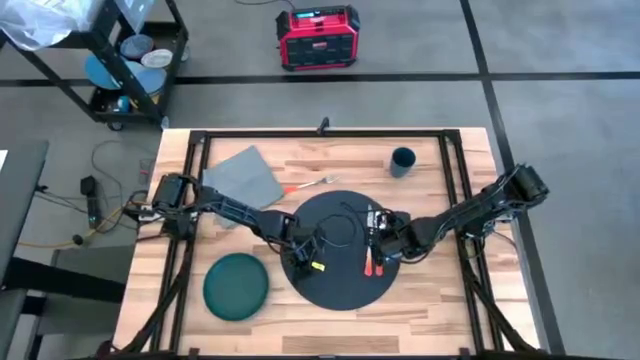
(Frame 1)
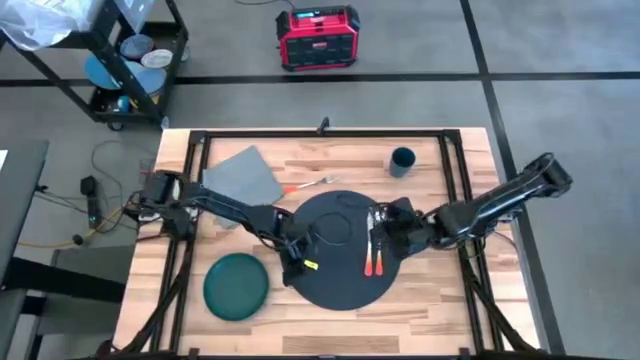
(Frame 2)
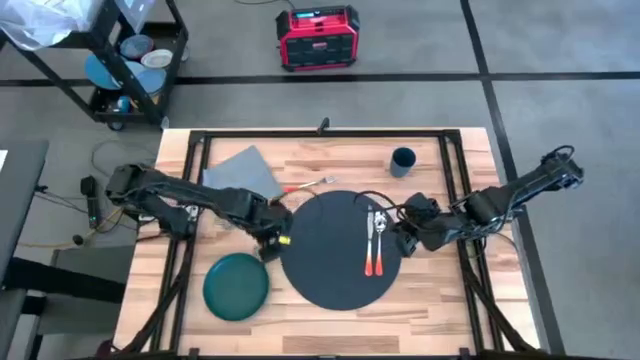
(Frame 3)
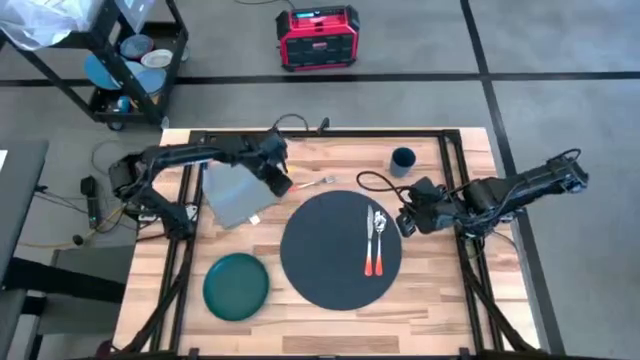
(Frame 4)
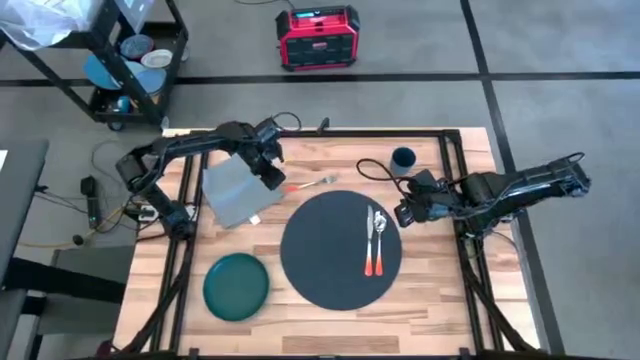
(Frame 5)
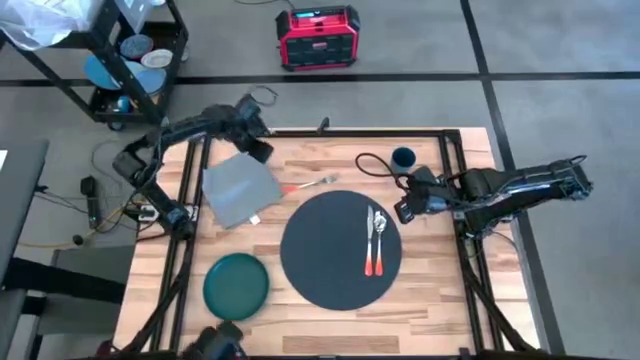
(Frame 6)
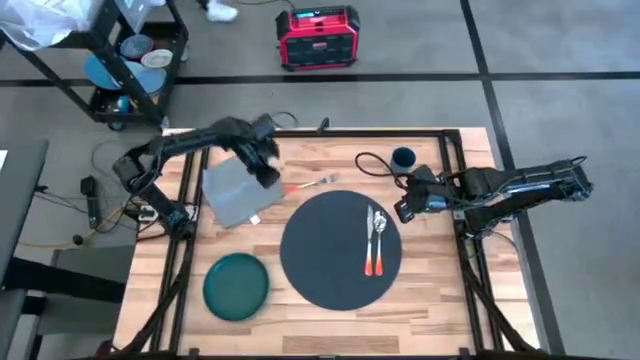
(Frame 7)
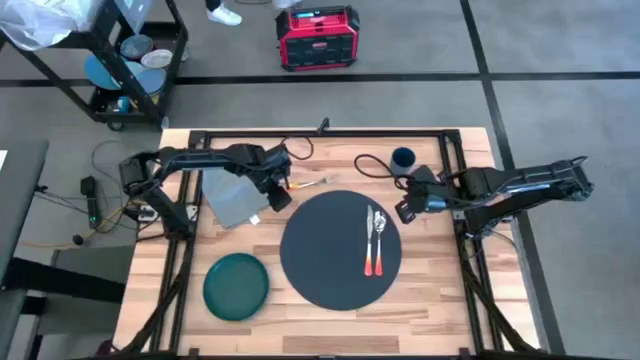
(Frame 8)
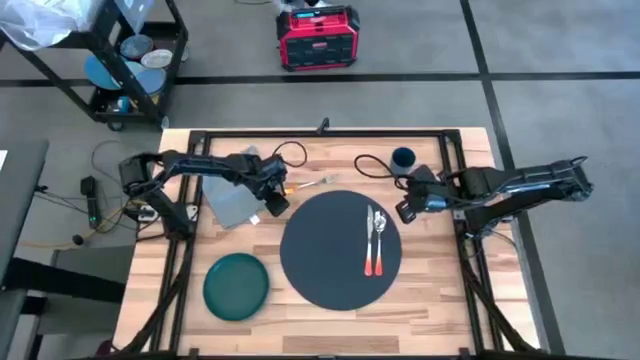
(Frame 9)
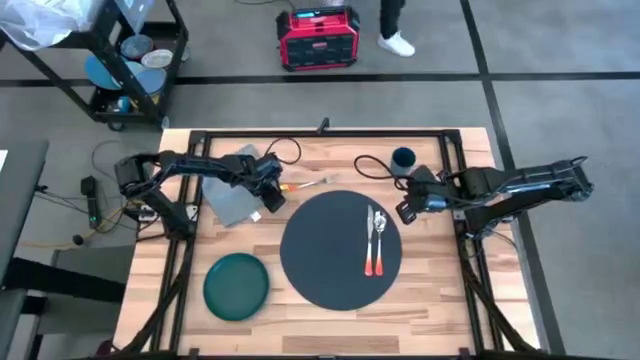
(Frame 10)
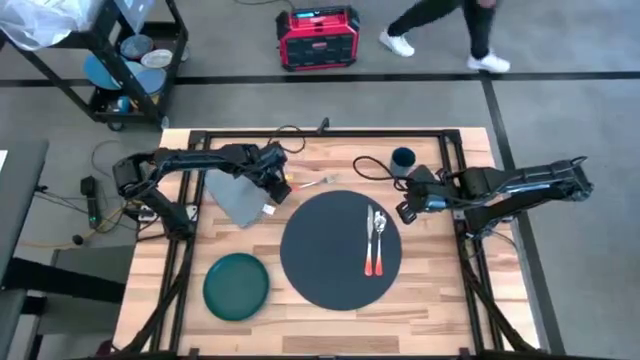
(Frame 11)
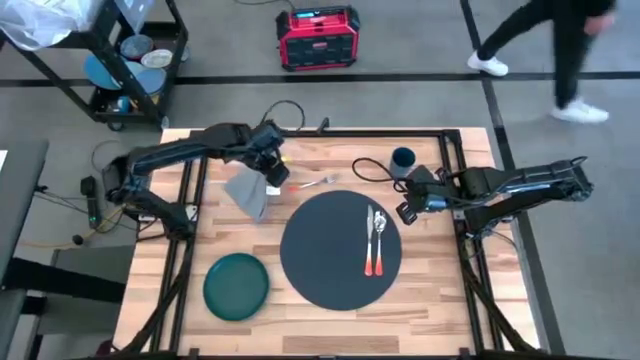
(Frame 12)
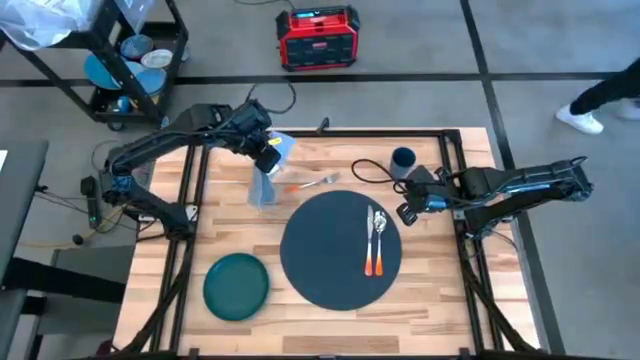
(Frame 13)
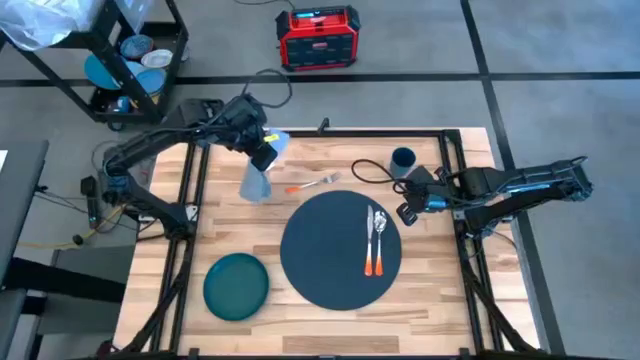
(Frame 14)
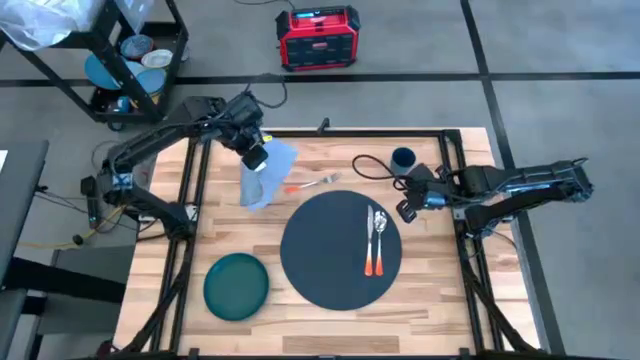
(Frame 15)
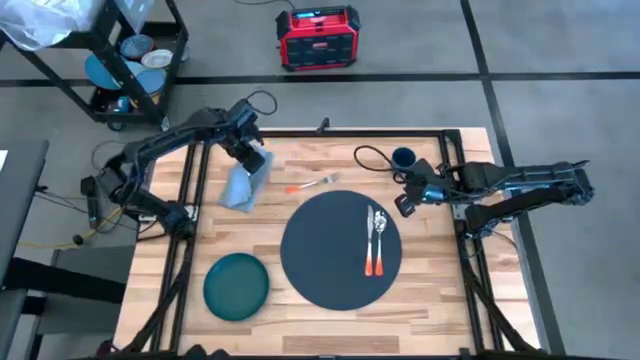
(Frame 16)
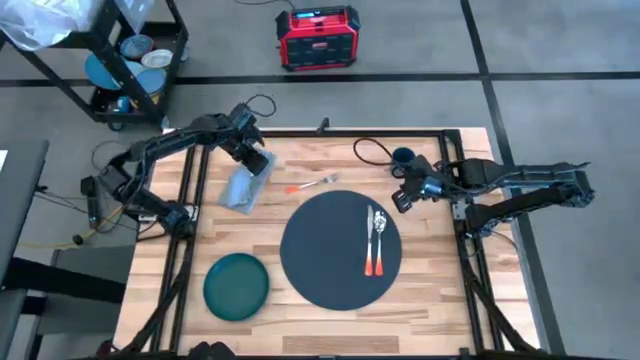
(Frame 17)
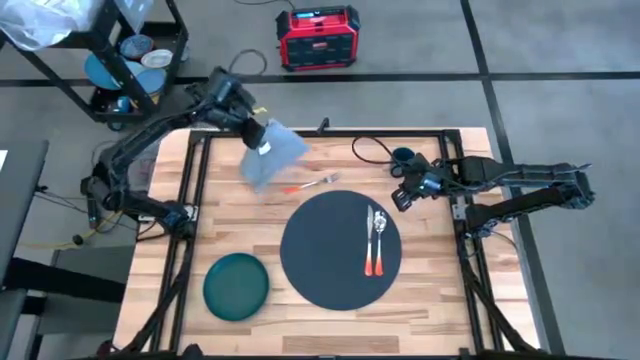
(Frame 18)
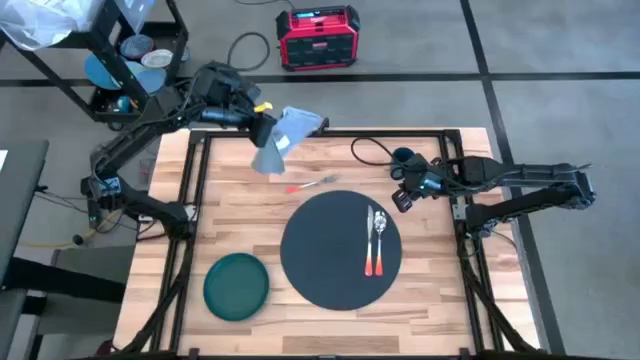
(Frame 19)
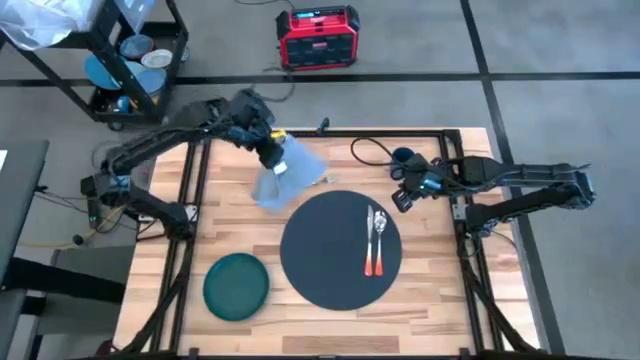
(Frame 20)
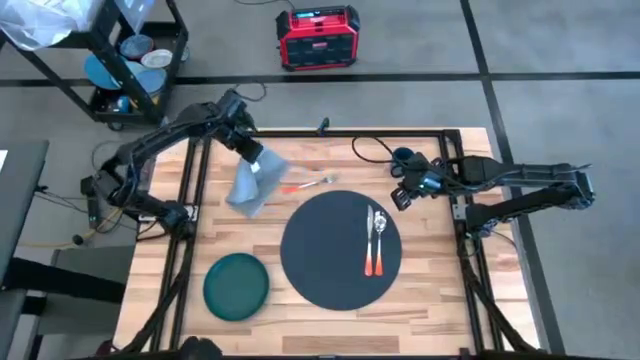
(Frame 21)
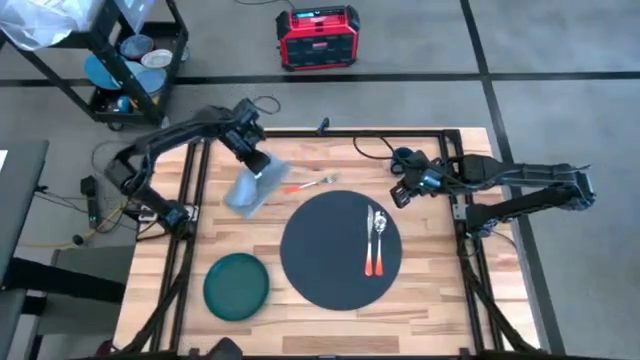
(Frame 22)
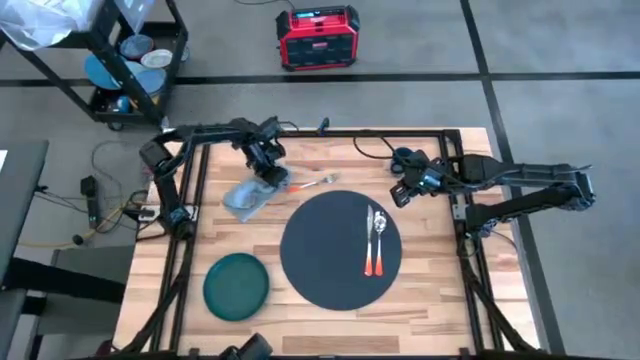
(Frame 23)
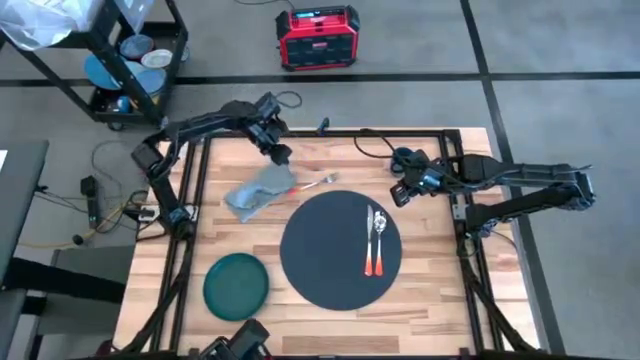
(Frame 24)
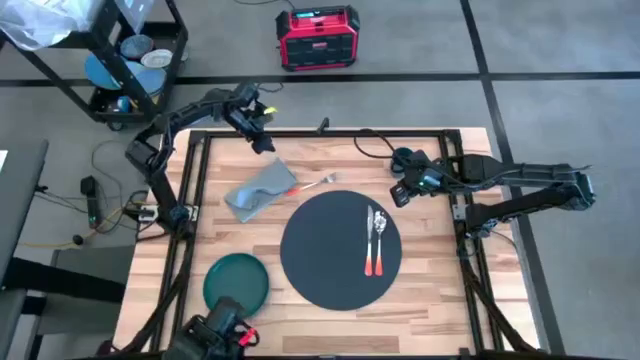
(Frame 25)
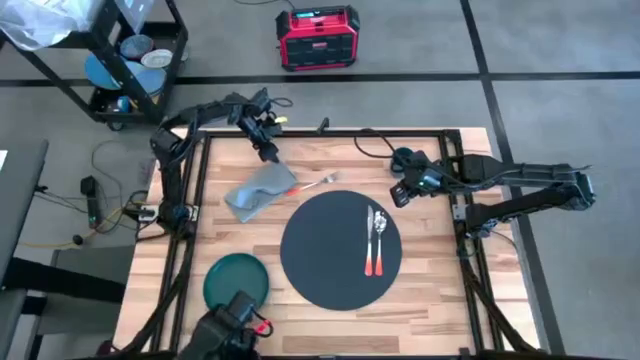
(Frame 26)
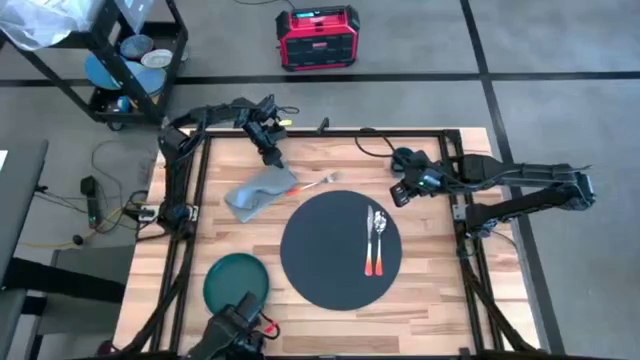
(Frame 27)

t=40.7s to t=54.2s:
Task: Set table place
Fold the gray table napkin

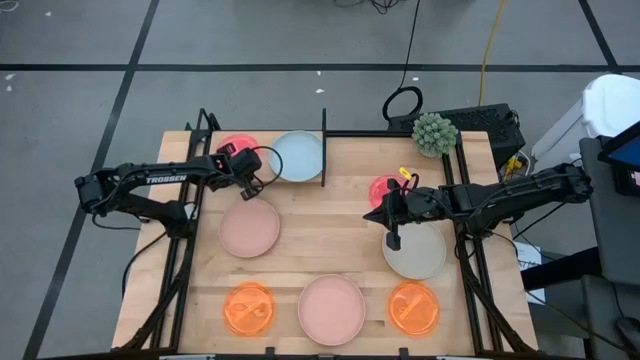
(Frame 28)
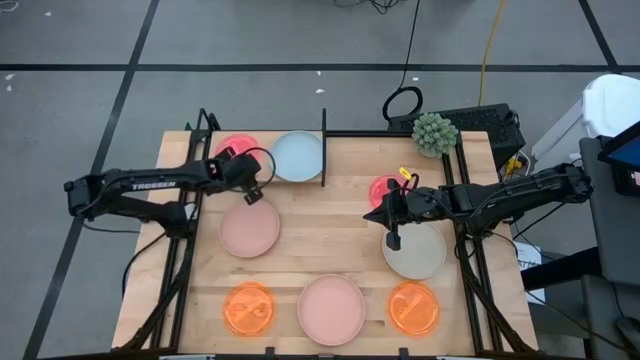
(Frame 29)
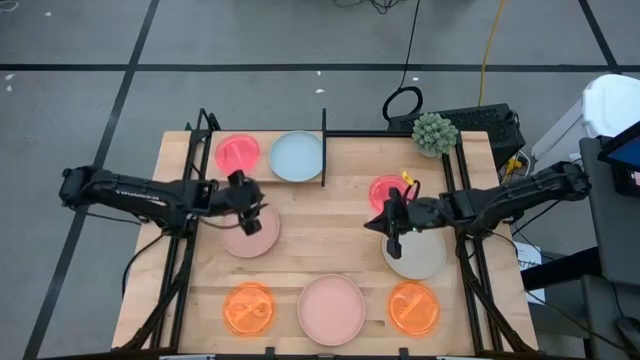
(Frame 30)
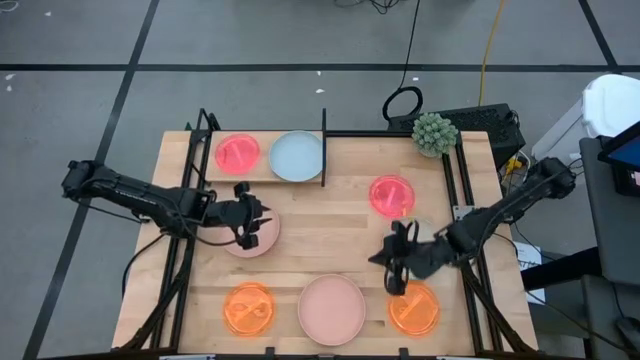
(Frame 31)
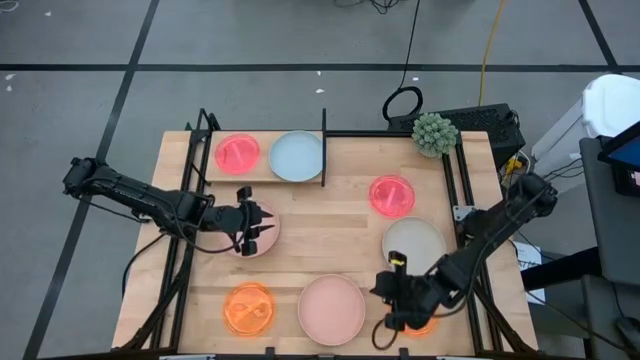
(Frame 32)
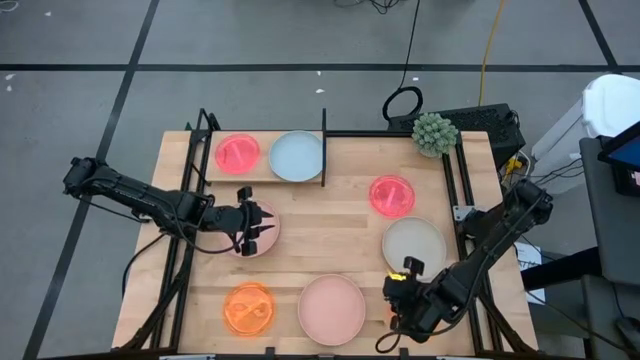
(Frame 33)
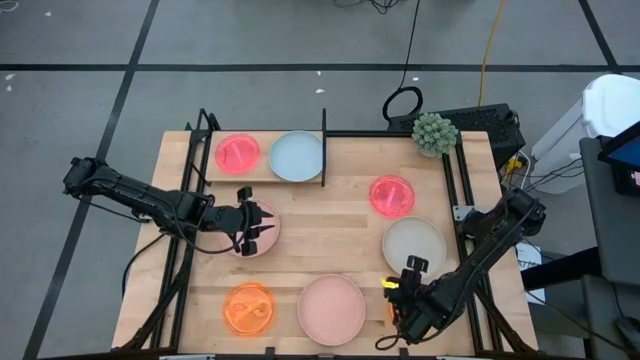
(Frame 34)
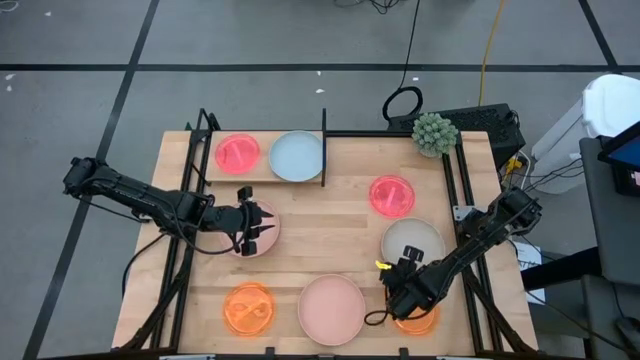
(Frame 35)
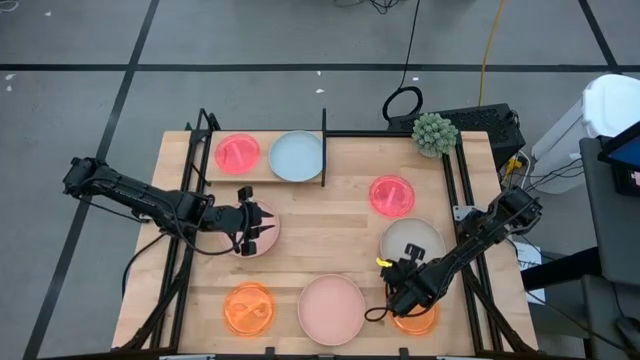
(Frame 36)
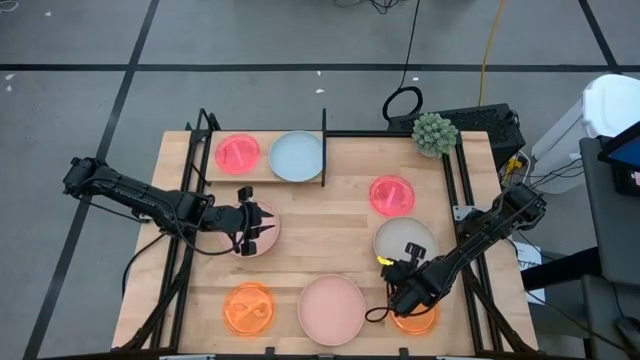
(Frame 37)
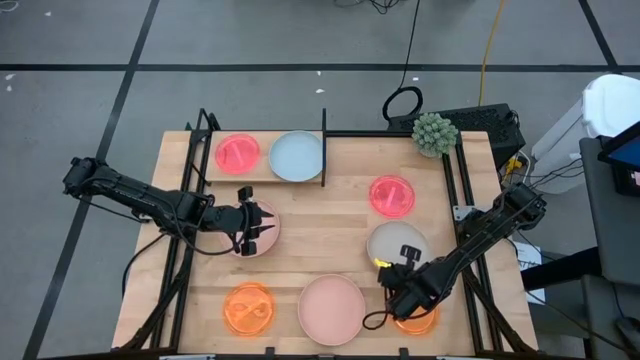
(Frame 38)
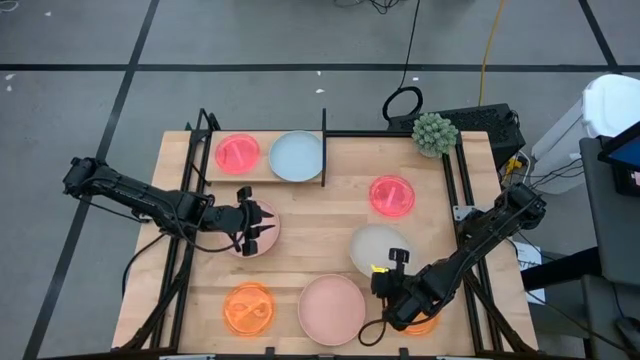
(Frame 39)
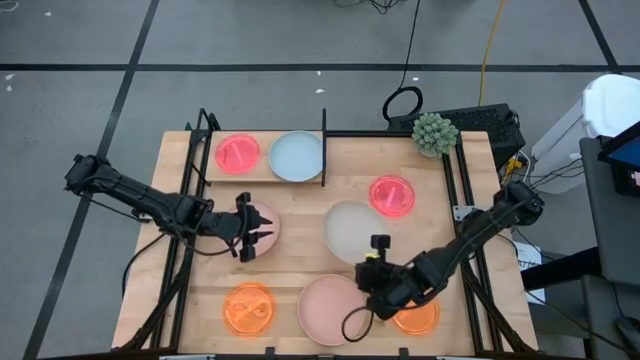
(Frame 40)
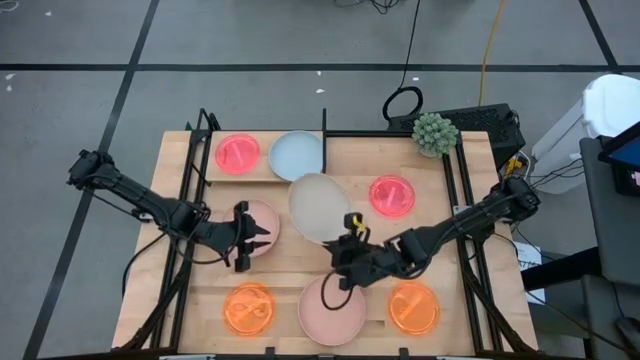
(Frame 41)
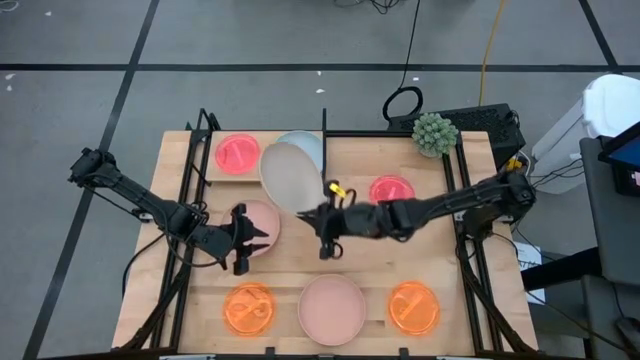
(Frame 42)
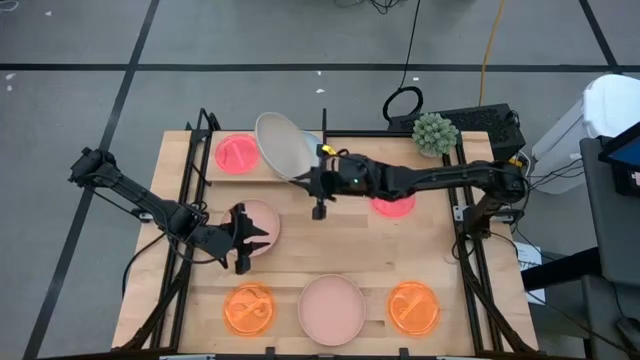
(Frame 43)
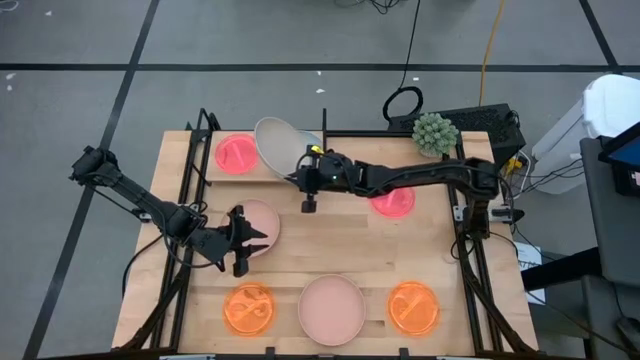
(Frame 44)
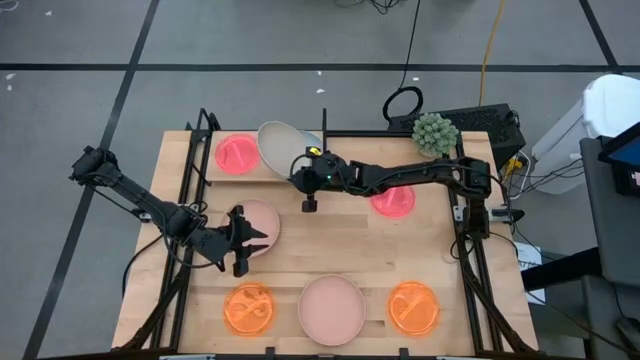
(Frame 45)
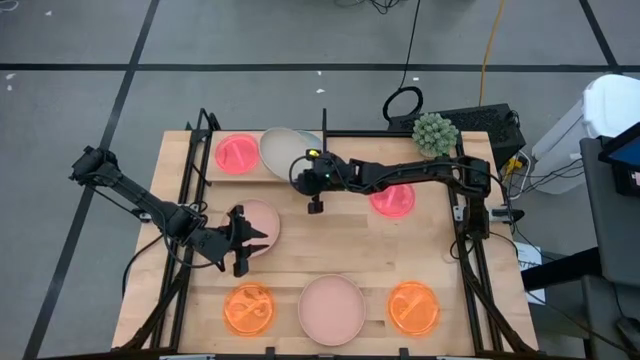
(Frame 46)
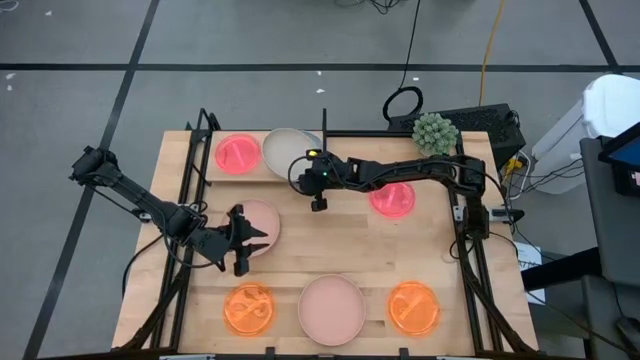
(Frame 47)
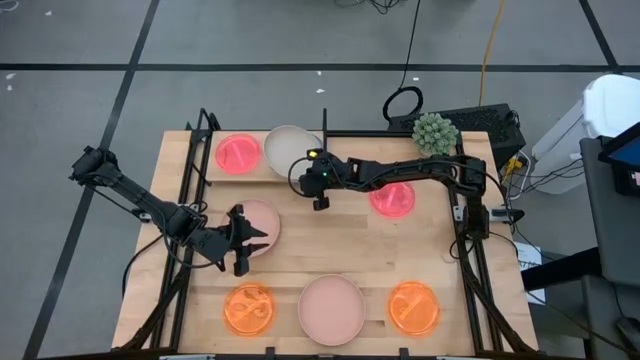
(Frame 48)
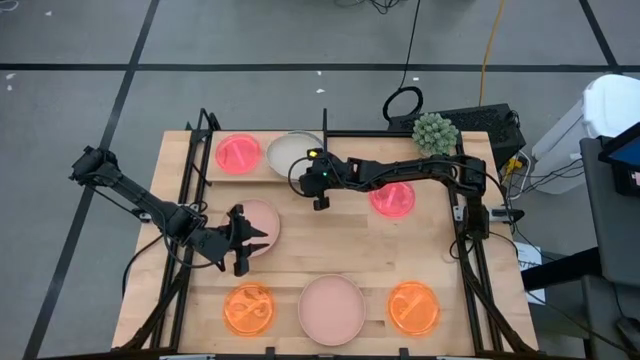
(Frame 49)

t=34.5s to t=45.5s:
Task: Place and stack plates onto a shelf
Stack the gray plate on top of the blue plate on the shelf
